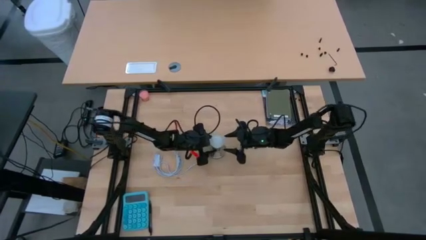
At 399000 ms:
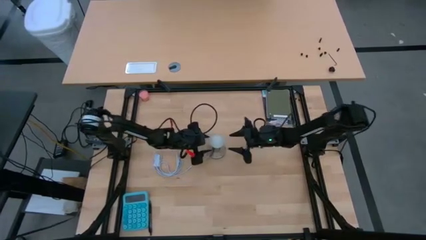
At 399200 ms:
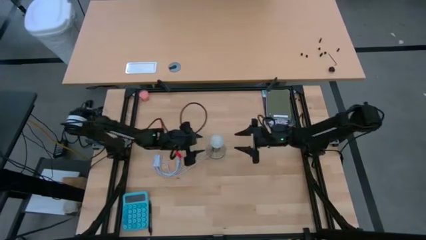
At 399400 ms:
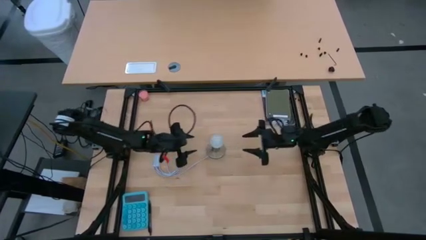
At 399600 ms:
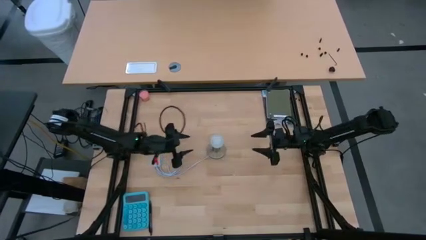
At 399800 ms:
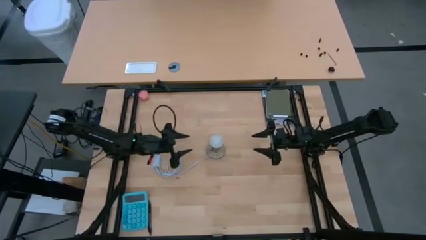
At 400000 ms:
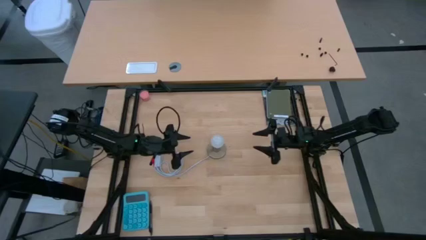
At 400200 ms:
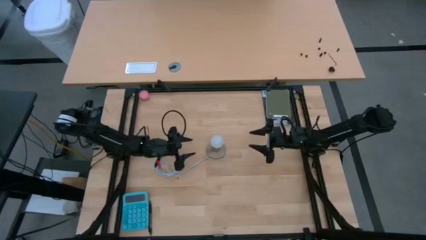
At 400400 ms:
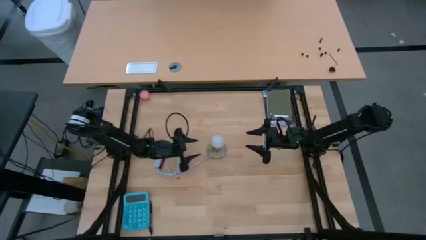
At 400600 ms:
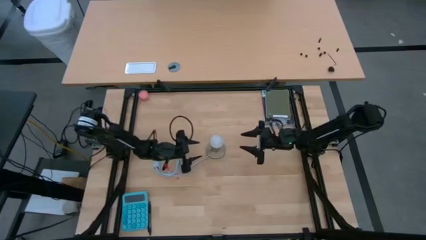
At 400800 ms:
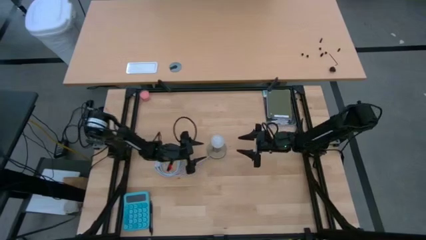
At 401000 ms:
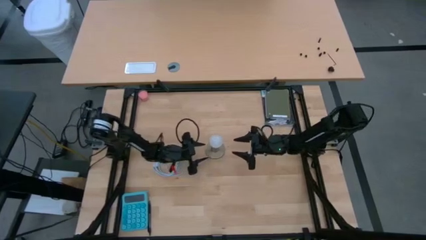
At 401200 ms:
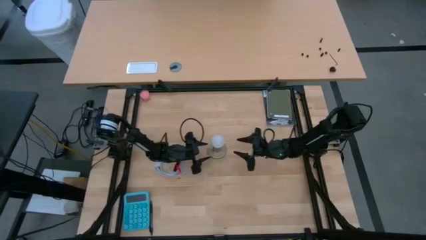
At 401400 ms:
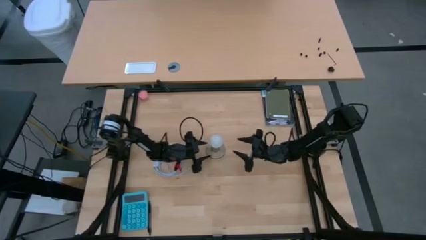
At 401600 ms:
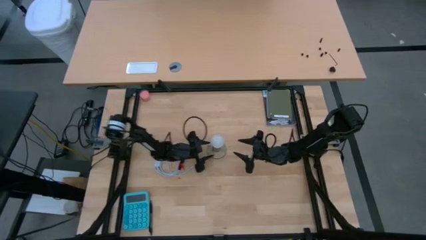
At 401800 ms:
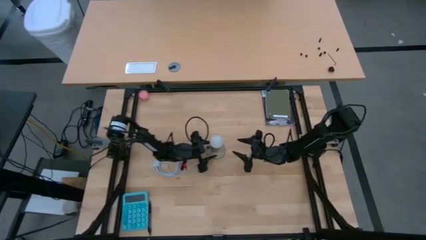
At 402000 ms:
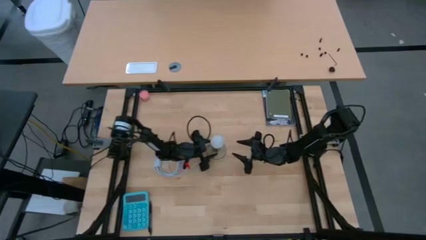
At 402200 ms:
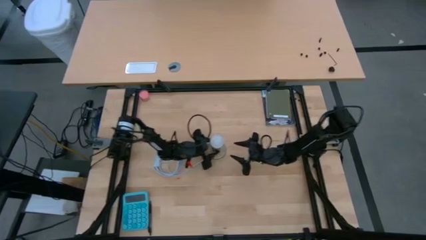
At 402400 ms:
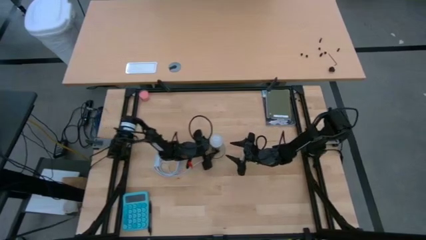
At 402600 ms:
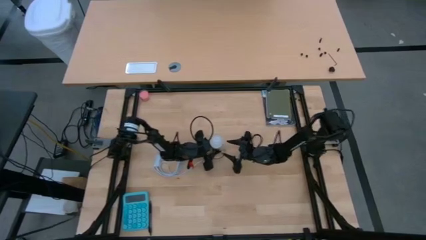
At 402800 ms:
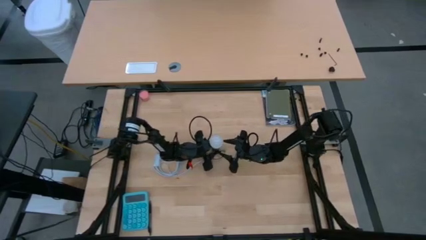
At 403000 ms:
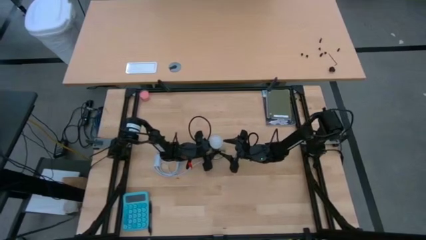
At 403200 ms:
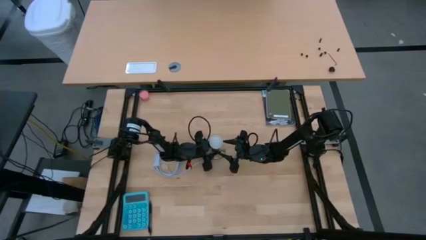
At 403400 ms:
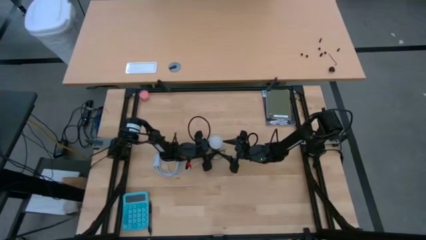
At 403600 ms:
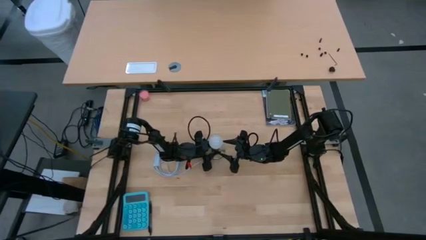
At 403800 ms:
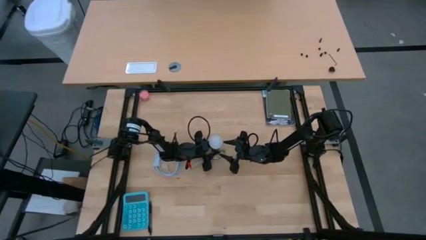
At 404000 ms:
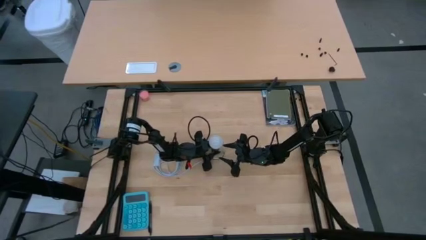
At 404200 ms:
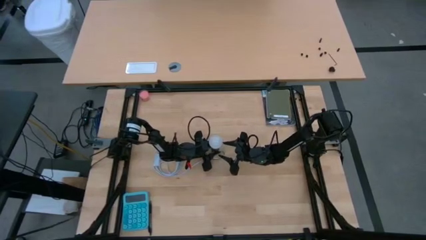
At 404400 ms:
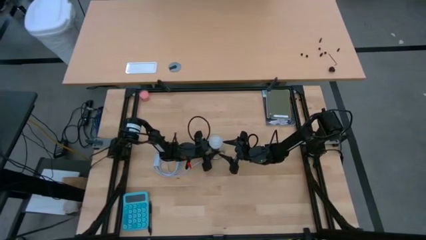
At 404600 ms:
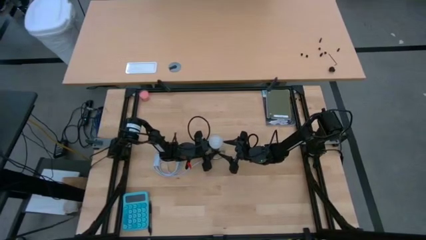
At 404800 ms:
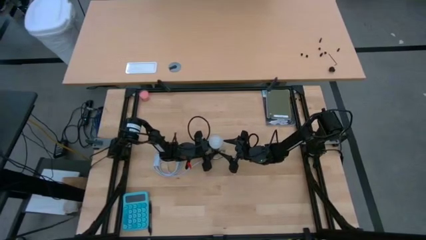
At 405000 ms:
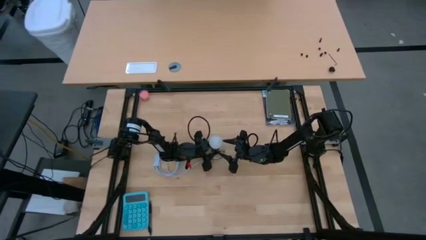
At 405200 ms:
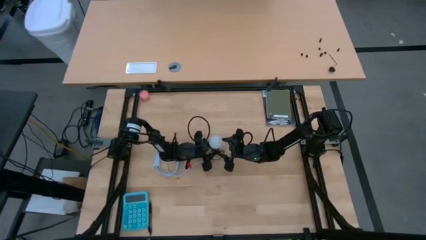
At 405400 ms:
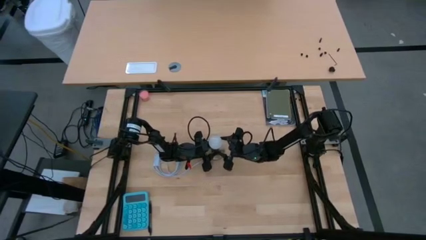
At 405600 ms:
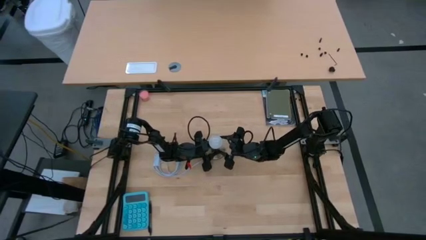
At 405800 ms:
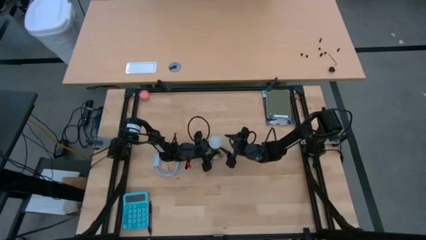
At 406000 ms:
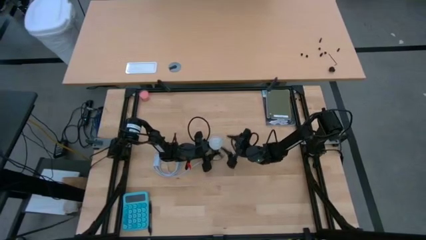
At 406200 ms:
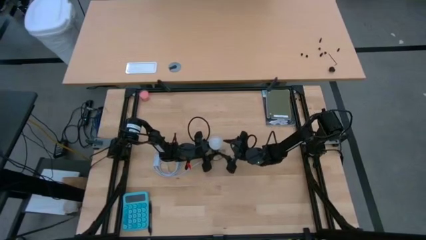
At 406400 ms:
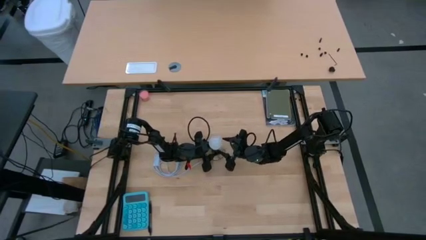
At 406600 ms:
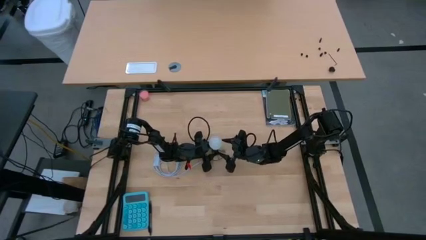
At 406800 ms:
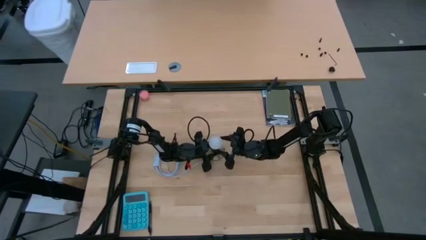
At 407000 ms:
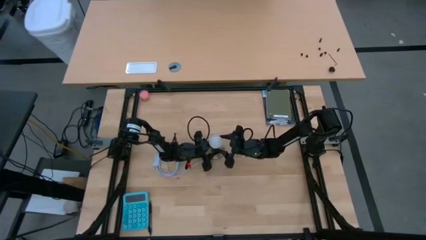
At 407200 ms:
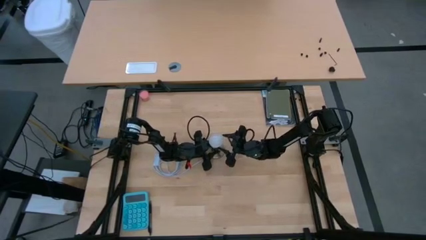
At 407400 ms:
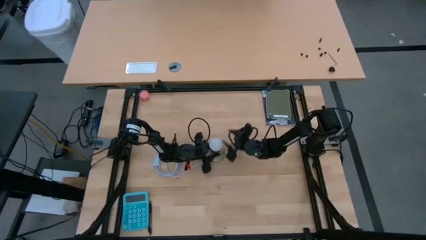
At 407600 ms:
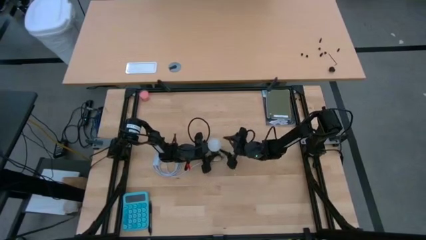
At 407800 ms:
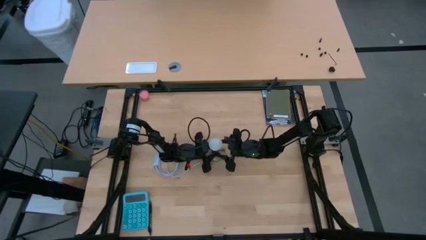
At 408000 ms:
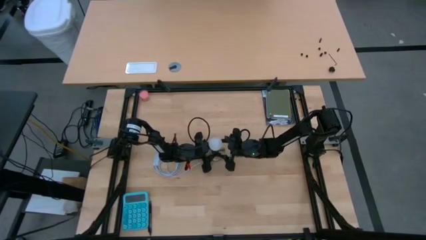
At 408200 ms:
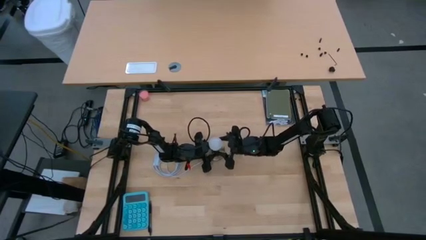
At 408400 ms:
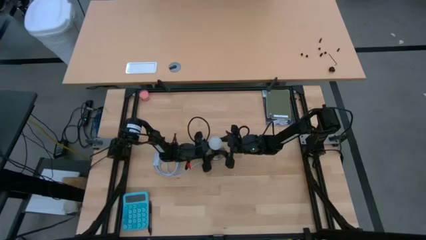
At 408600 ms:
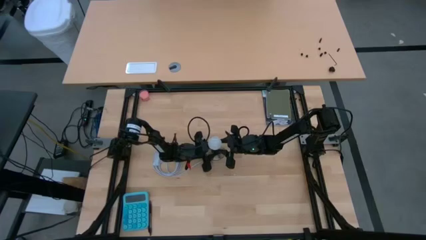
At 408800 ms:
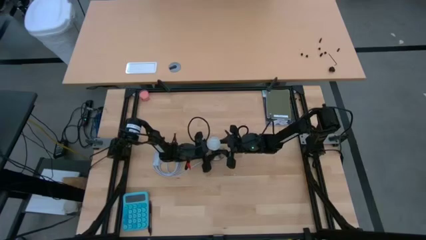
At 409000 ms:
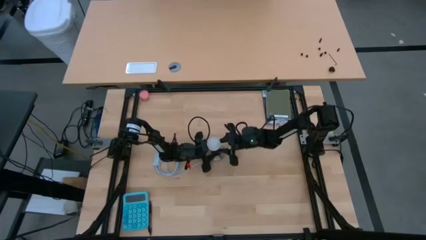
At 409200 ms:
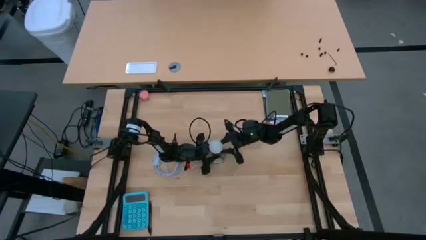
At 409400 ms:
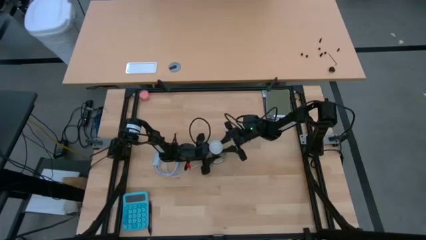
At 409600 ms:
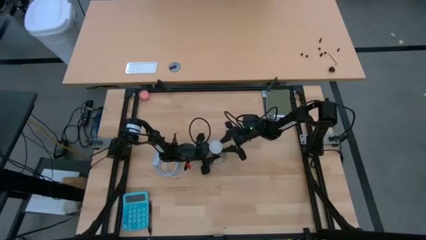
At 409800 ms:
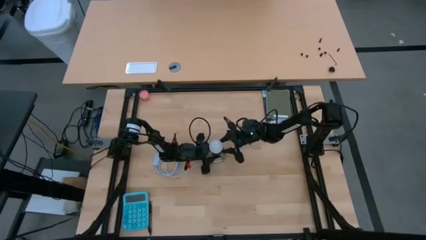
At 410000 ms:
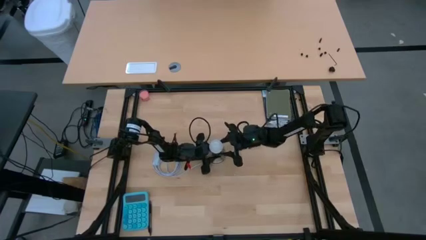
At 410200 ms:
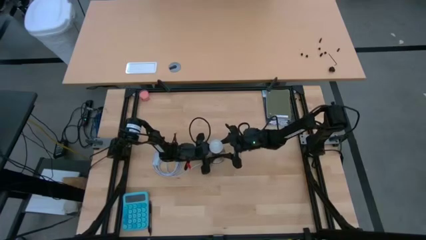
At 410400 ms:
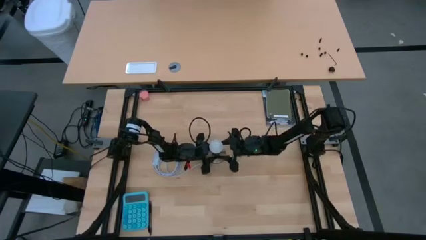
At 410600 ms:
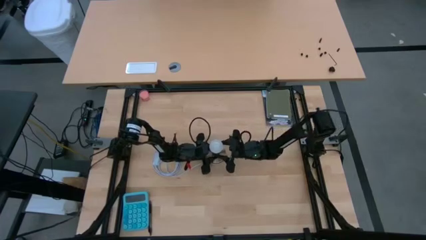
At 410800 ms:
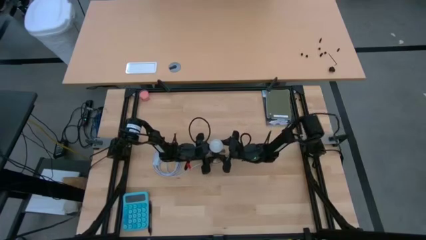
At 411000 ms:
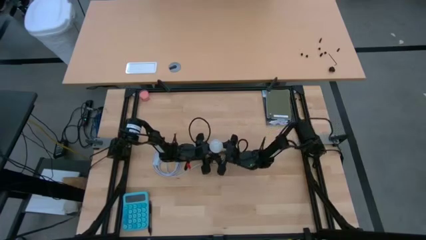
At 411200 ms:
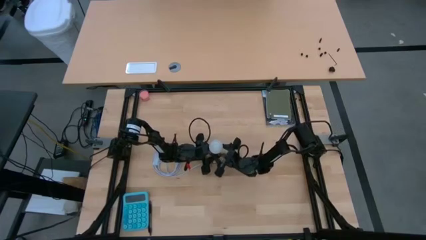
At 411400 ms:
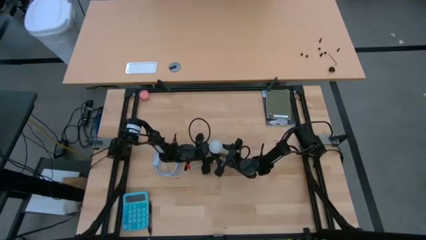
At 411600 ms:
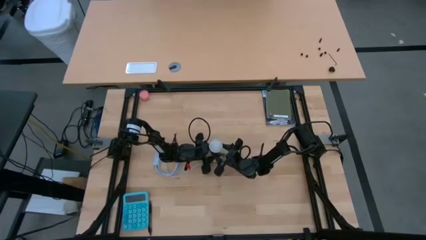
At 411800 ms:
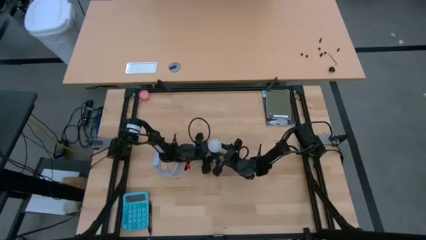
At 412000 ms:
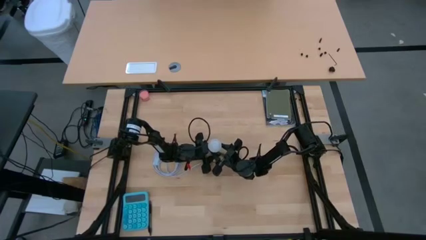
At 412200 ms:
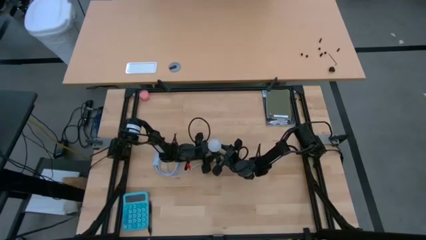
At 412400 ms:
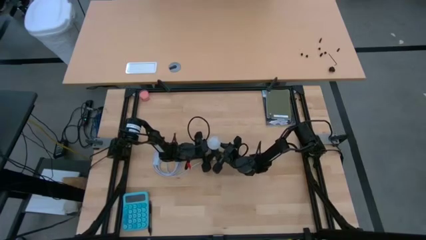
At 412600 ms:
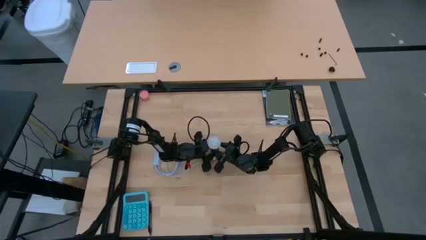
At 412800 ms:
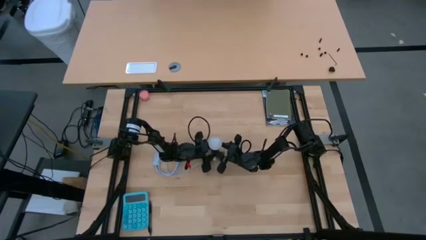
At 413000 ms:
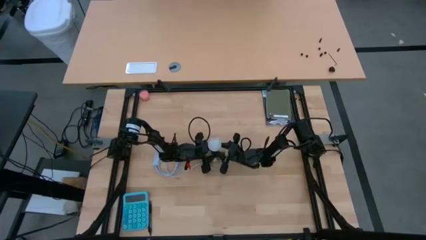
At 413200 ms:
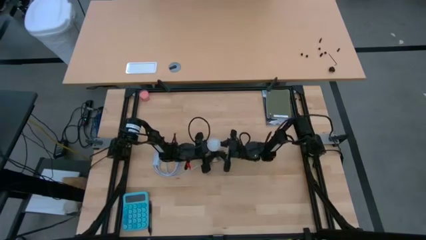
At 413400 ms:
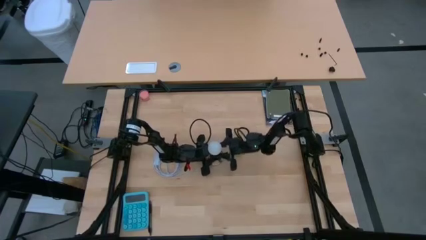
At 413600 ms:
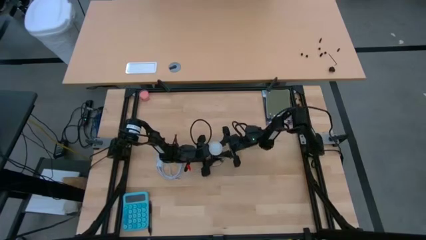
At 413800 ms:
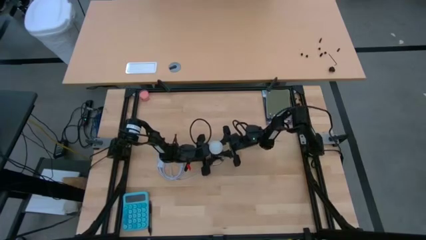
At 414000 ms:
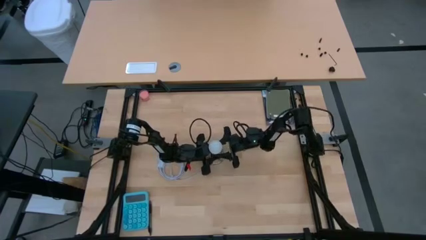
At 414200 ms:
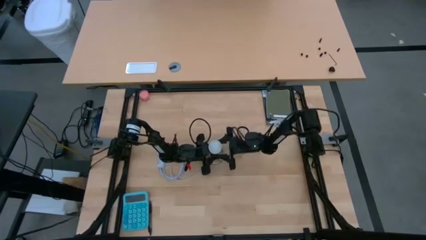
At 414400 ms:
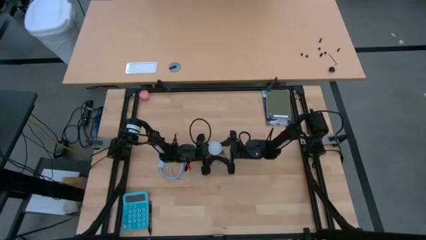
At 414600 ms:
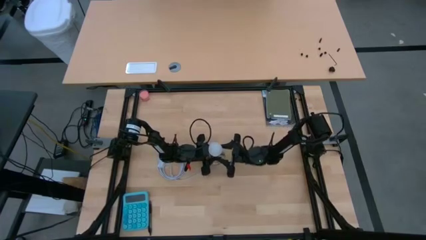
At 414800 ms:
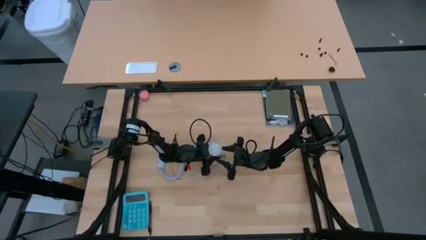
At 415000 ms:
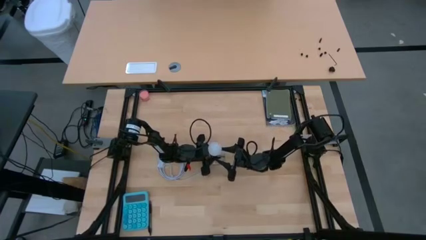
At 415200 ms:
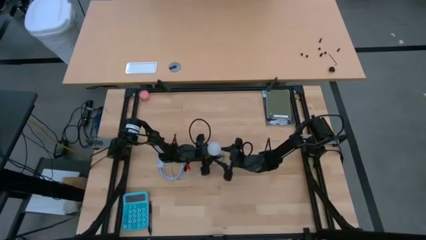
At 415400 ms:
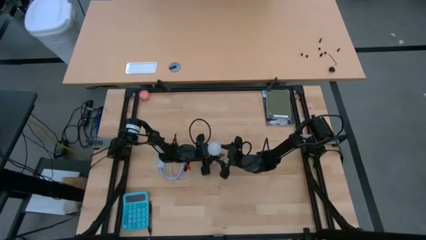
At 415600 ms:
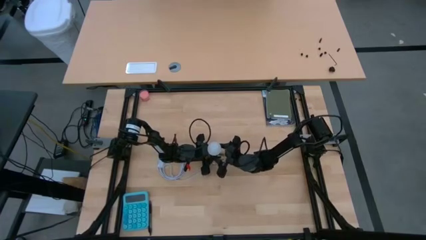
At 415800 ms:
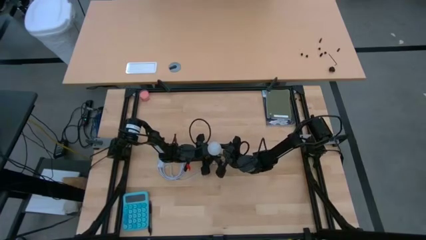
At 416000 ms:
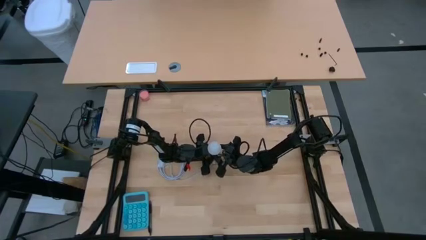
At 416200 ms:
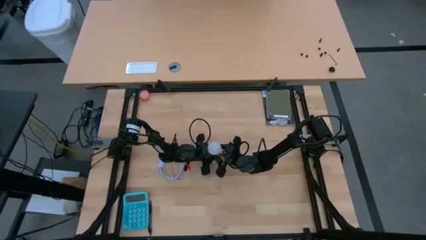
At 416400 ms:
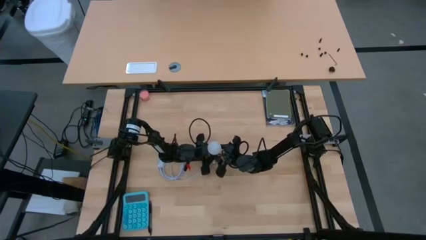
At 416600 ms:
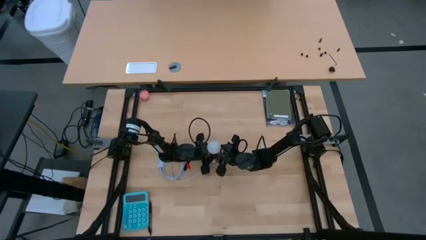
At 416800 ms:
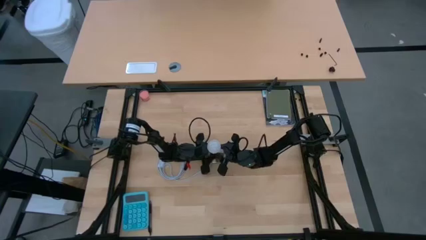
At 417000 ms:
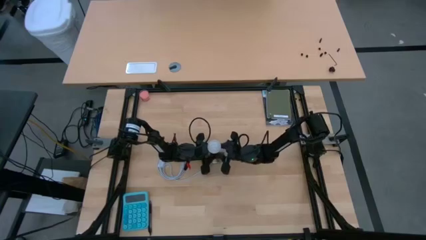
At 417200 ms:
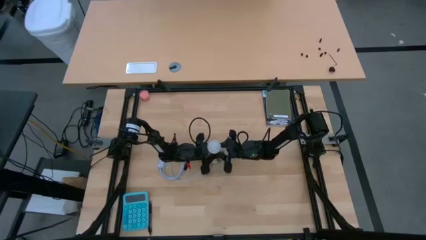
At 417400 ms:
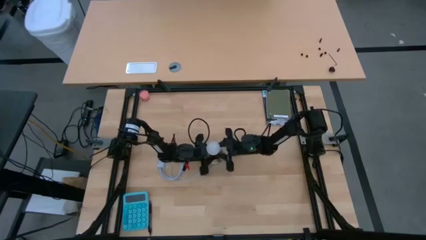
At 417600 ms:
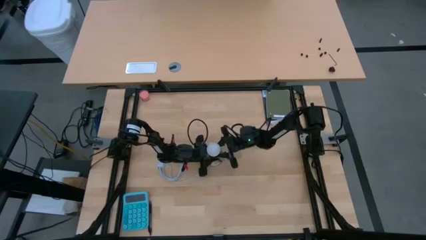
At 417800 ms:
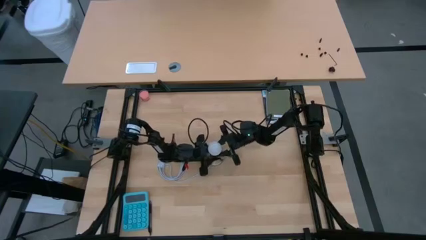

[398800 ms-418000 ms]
Task: Screw lightbulb
Remove the lightbulb from the lamp
